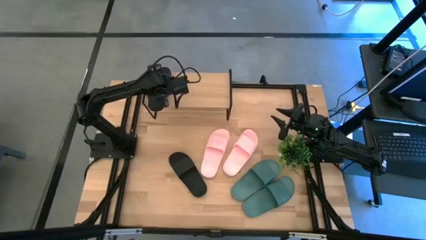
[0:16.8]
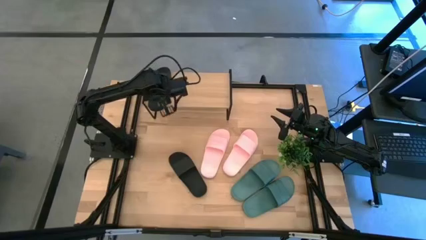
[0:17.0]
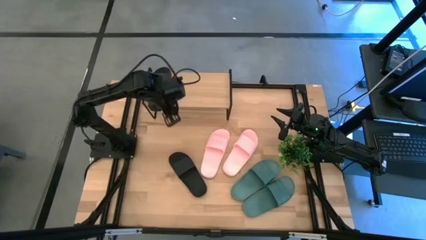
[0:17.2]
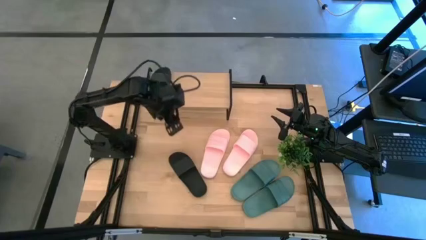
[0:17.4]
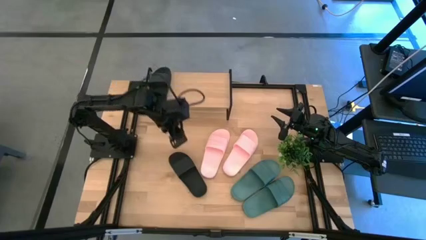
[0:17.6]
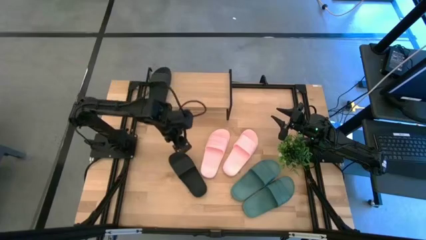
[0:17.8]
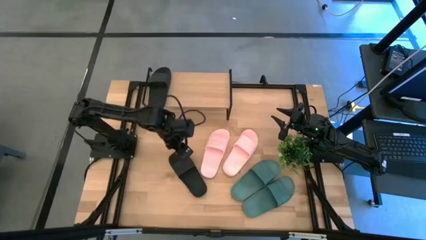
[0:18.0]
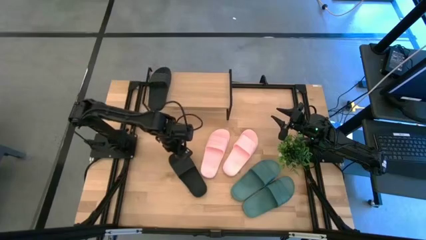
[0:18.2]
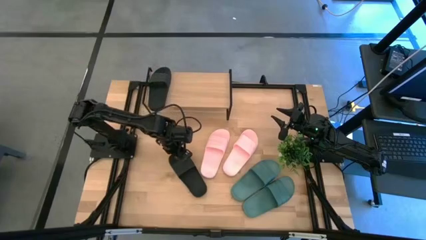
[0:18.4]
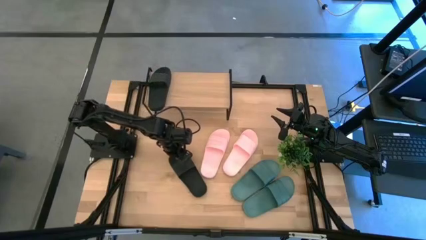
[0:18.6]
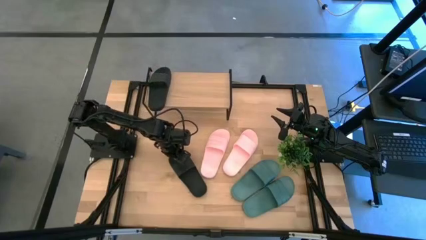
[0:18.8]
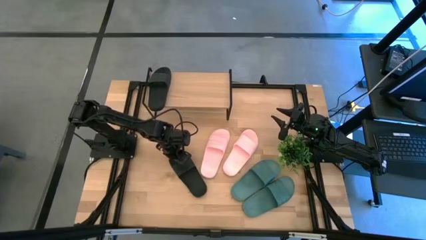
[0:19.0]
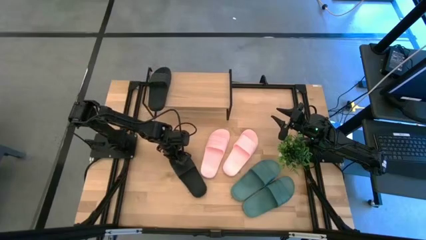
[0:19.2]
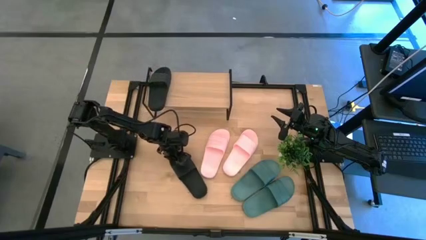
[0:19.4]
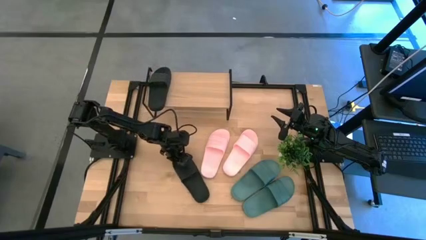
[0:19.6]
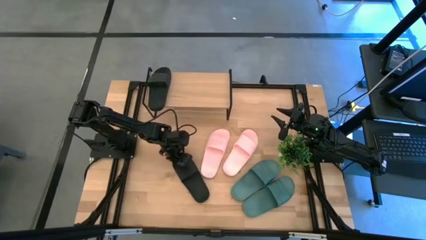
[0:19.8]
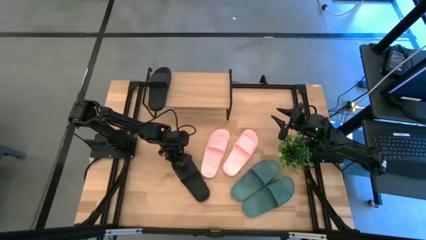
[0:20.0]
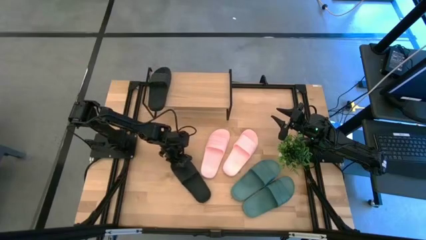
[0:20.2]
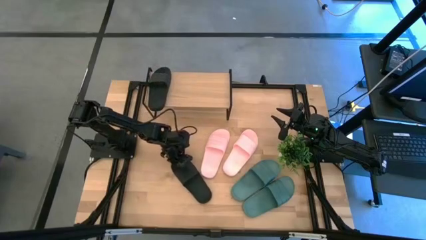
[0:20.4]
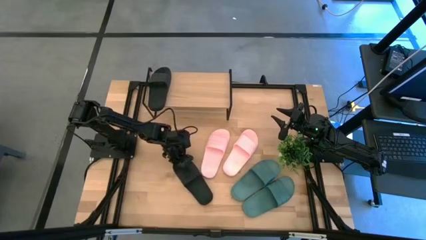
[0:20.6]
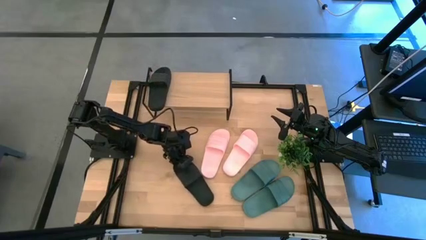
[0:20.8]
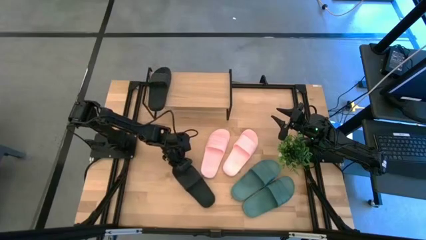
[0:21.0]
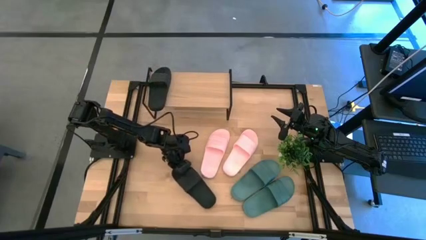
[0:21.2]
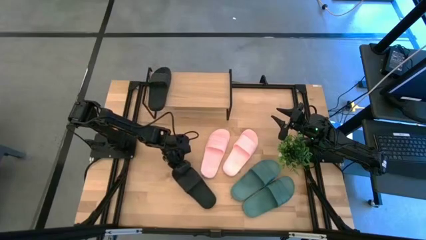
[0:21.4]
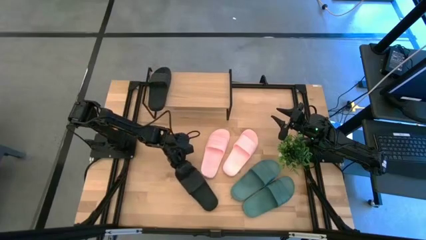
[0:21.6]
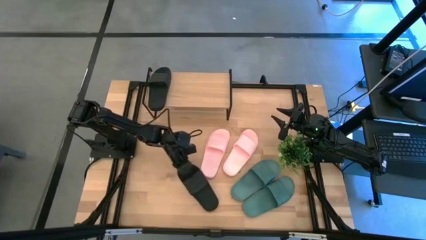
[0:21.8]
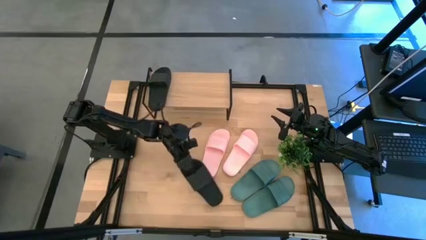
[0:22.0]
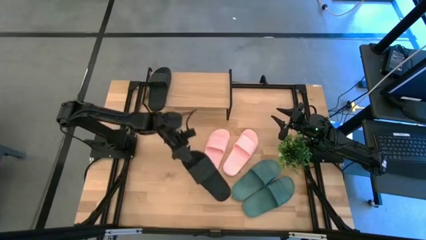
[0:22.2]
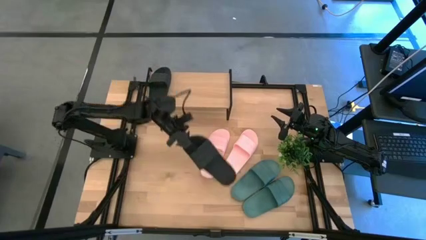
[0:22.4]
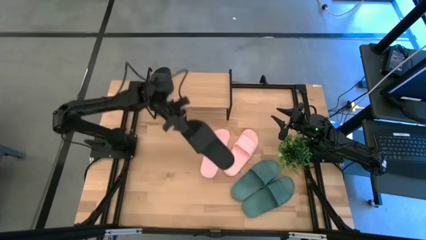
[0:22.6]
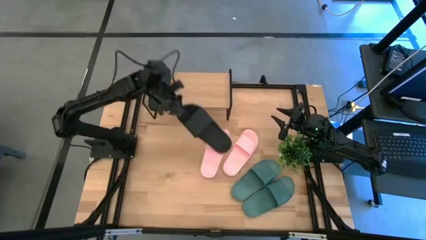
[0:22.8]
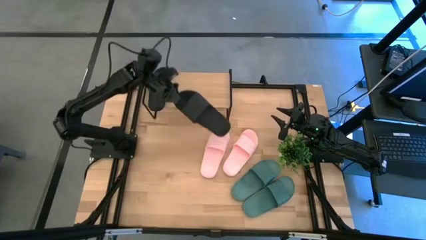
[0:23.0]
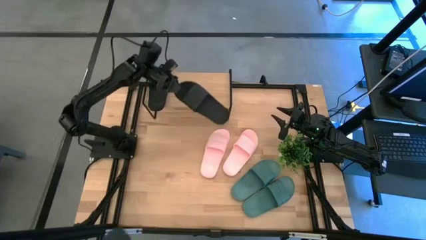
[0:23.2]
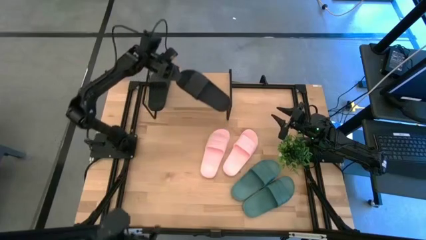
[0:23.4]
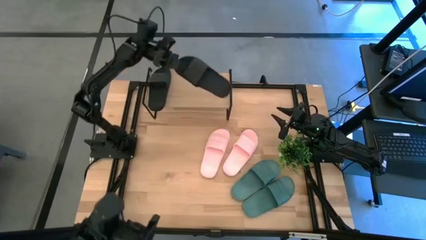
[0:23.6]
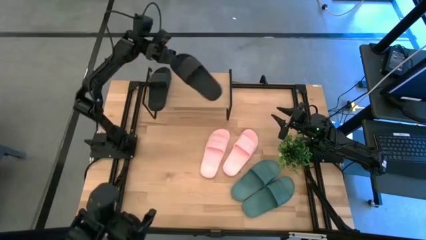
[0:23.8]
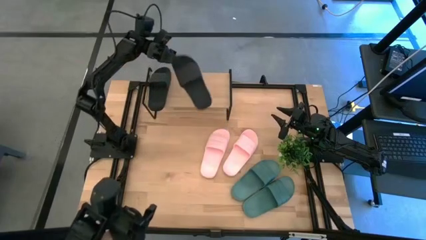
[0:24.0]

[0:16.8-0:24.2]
Task: Pick and place slides into the shelf
Put the black slide on the shelf

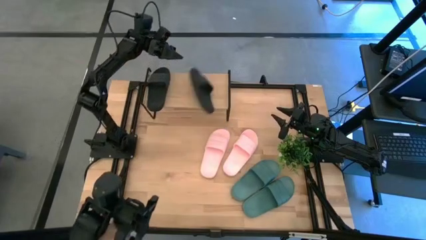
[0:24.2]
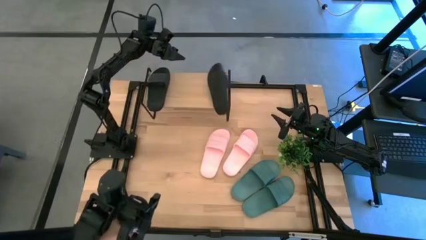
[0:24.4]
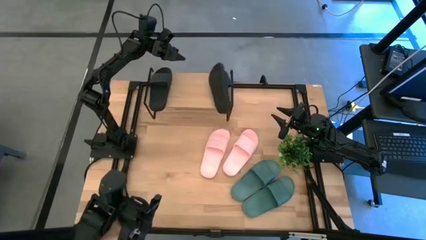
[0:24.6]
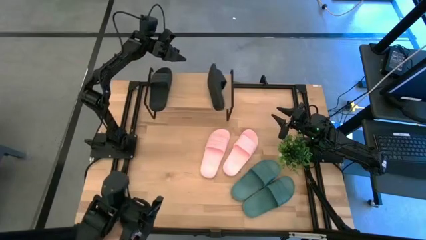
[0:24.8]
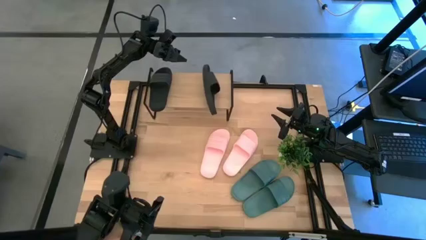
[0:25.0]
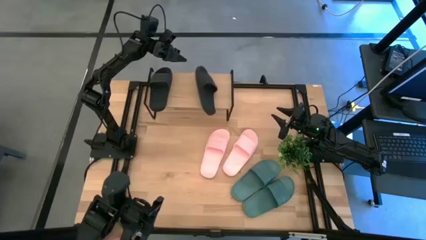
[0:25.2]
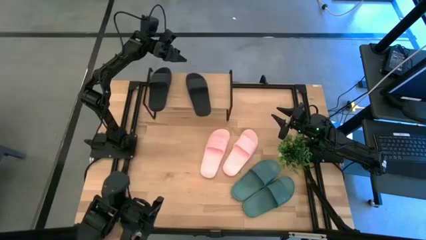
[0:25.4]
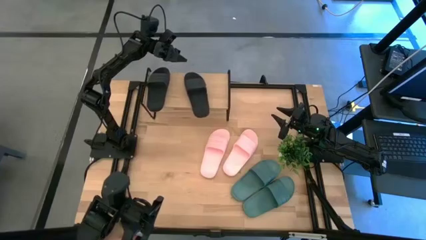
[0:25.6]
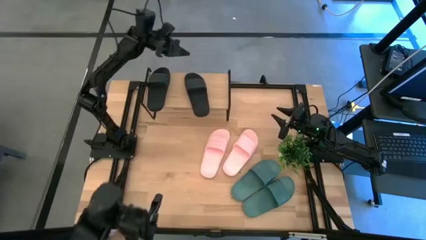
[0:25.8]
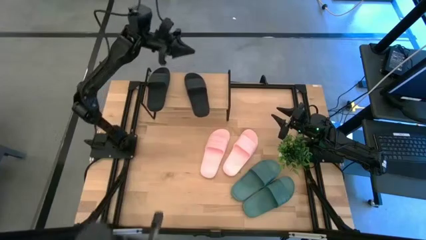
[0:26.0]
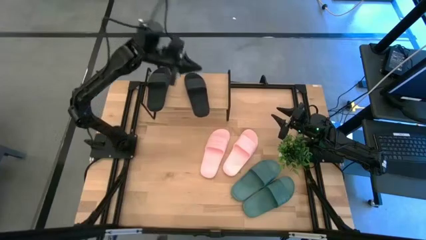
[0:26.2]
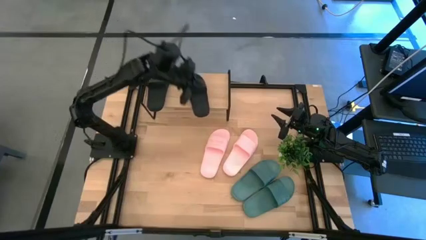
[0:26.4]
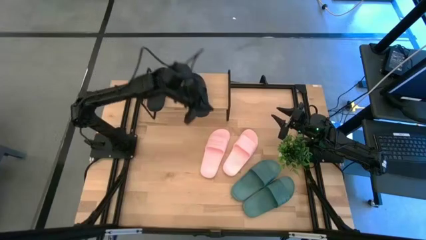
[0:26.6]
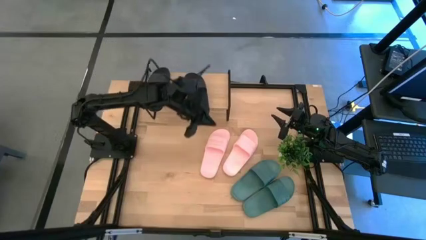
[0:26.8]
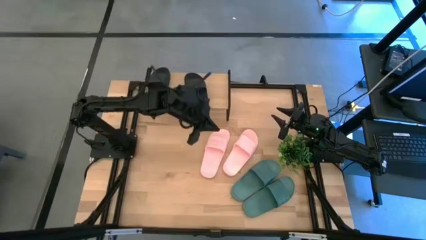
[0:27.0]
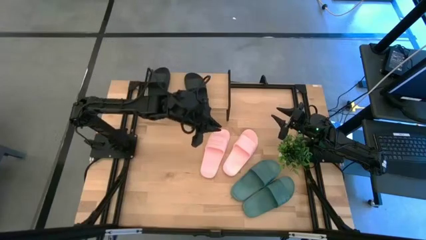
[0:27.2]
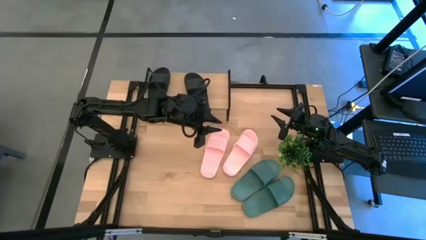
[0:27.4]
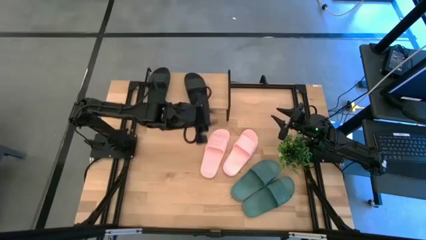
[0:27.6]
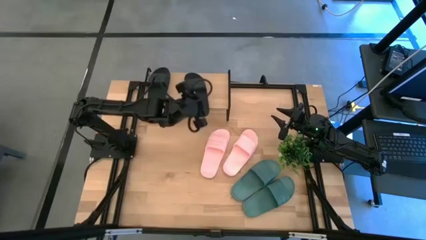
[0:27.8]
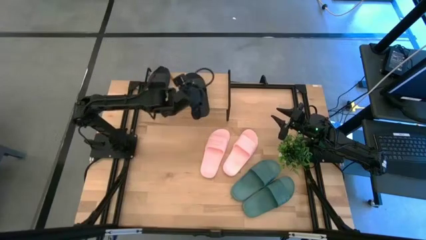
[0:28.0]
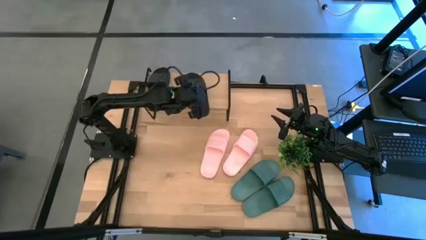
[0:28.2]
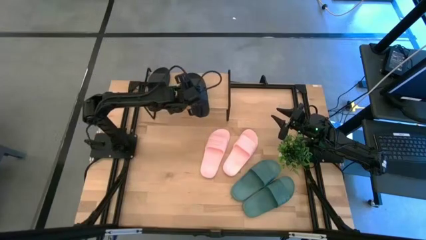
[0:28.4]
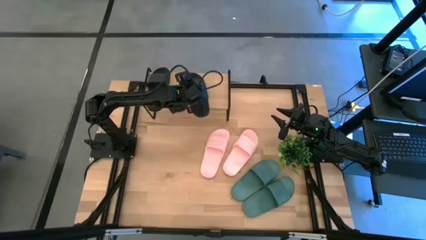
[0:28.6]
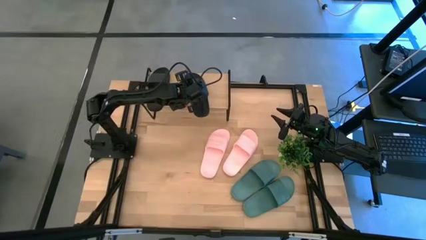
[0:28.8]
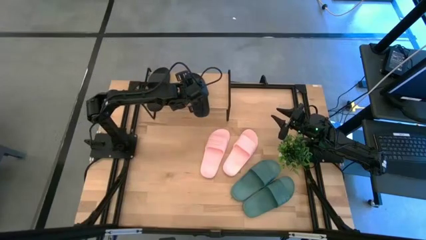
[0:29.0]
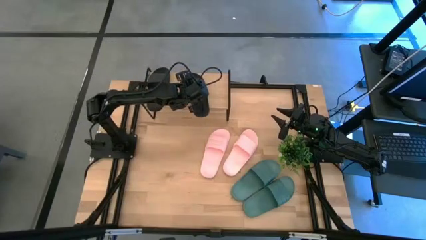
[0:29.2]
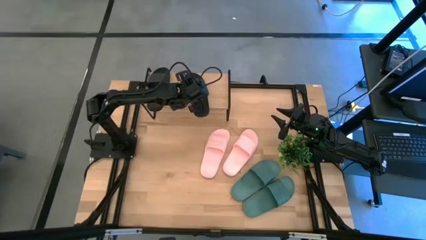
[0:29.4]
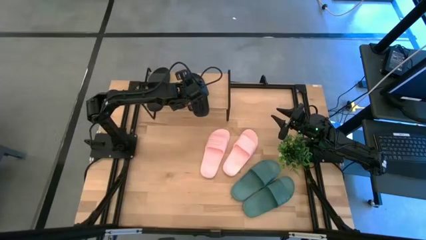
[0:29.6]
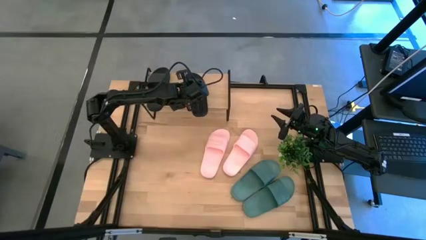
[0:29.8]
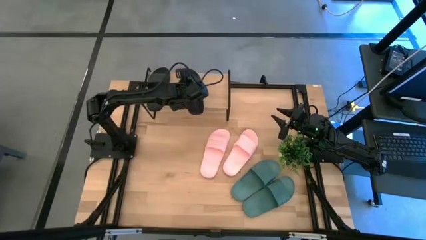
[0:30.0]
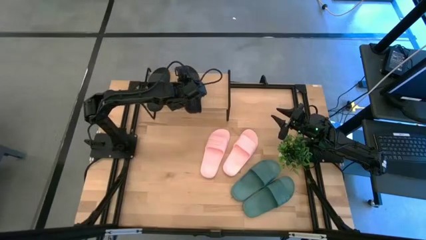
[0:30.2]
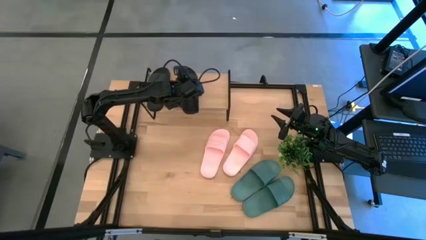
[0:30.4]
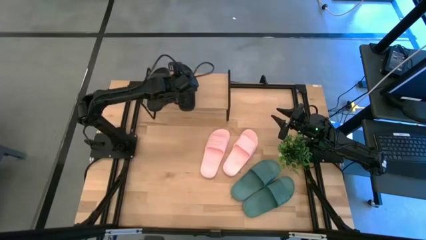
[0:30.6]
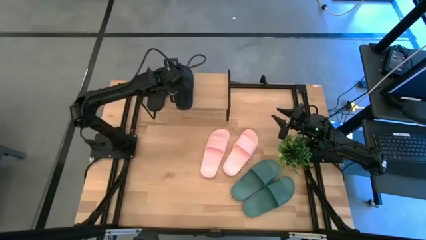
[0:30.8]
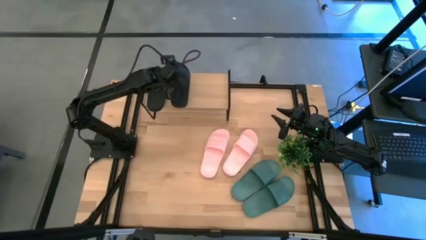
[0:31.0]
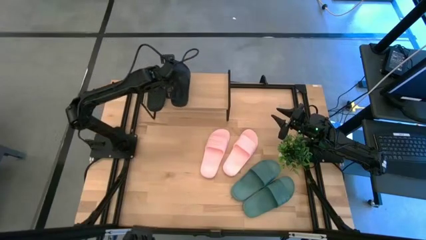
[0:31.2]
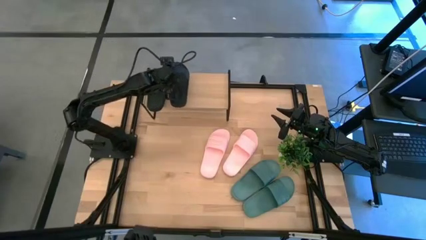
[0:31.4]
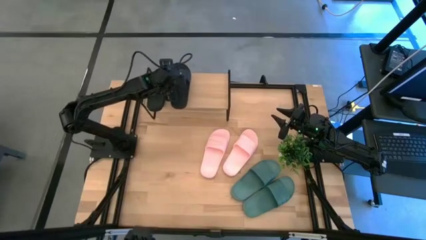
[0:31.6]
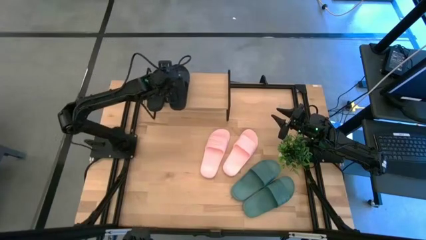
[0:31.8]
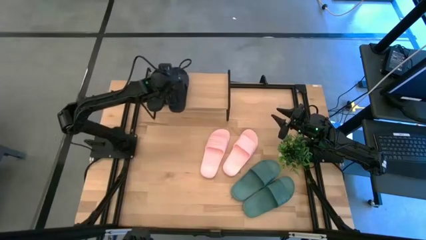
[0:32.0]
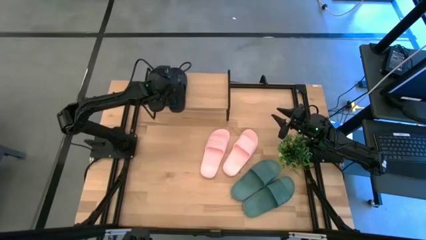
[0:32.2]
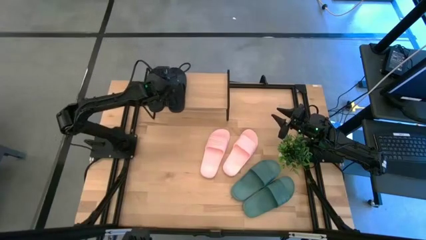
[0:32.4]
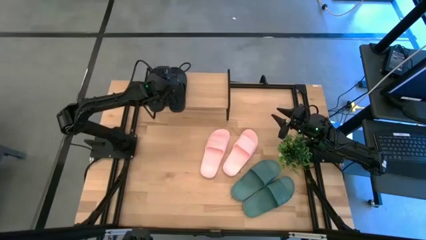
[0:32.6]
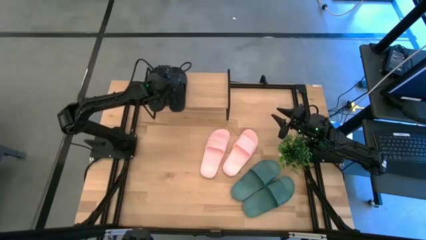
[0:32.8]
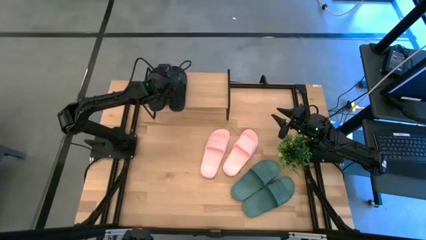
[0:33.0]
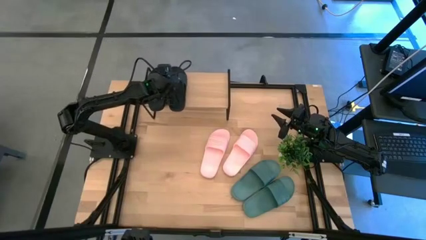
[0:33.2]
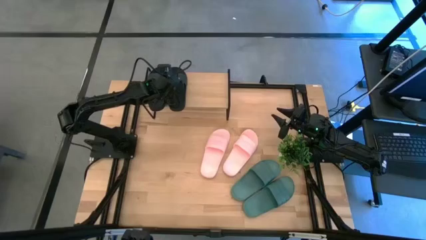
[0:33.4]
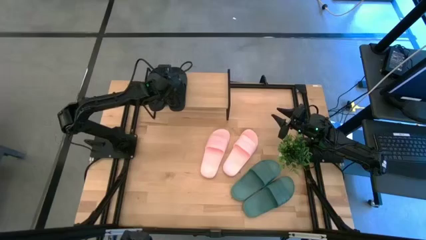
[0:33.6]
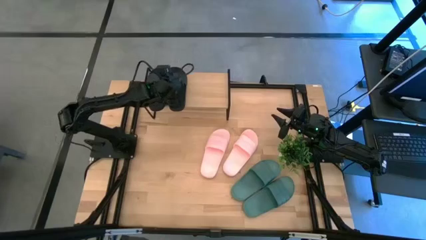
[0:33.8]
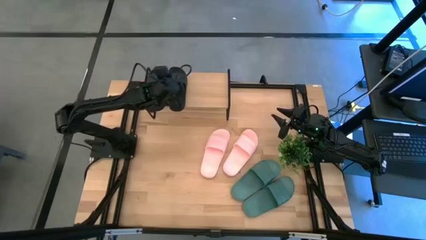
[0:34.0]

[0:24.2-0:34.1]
Put the black slide on the shelf
